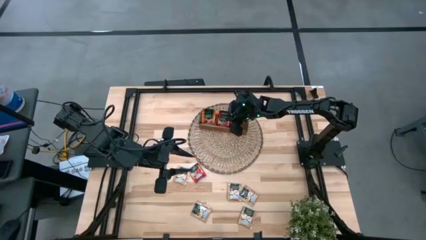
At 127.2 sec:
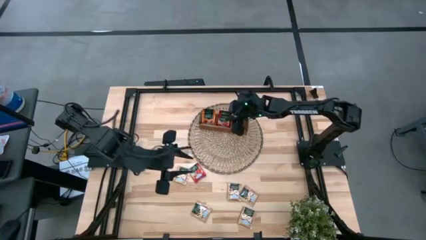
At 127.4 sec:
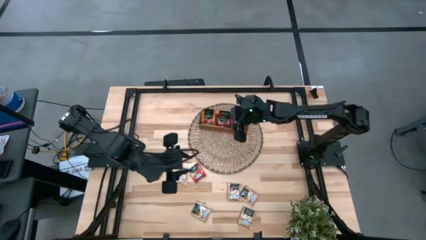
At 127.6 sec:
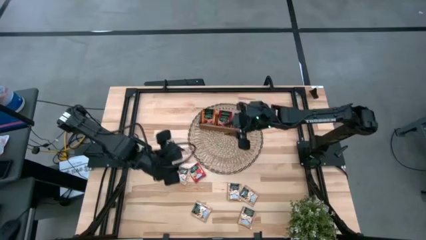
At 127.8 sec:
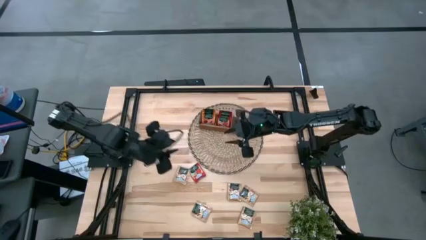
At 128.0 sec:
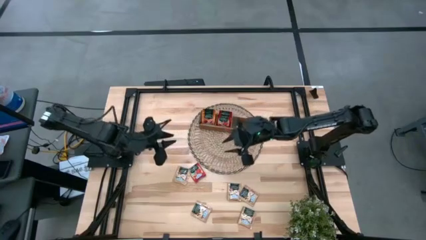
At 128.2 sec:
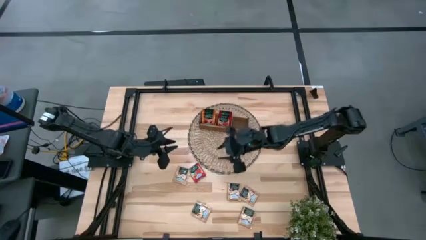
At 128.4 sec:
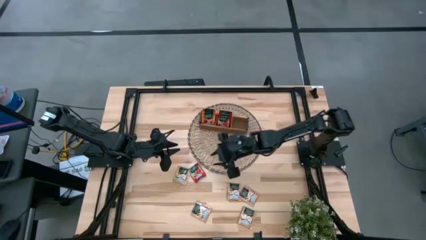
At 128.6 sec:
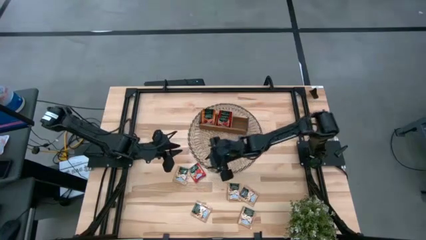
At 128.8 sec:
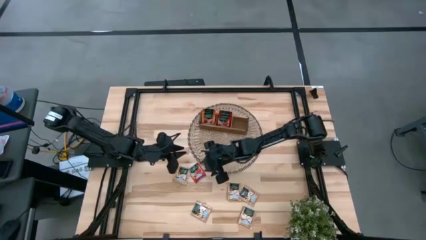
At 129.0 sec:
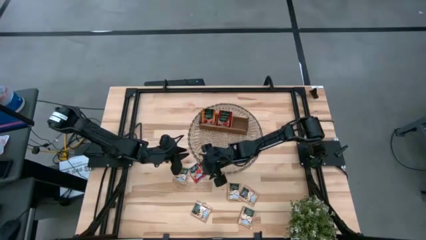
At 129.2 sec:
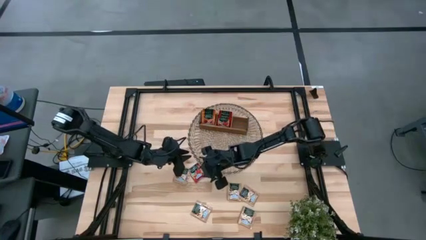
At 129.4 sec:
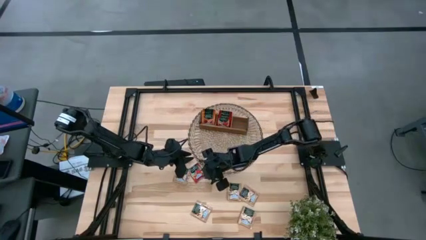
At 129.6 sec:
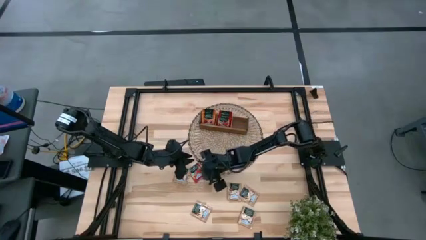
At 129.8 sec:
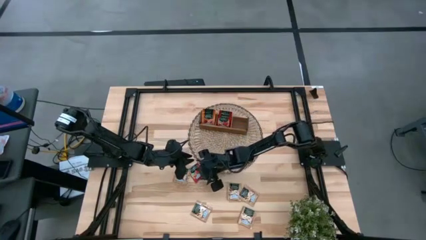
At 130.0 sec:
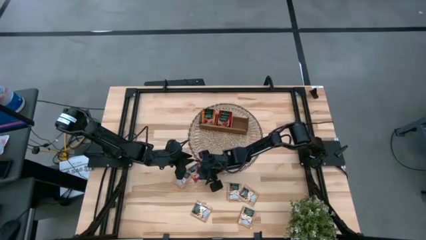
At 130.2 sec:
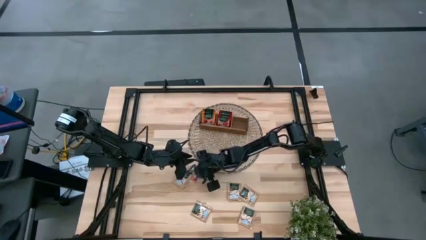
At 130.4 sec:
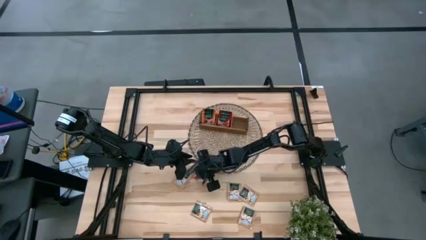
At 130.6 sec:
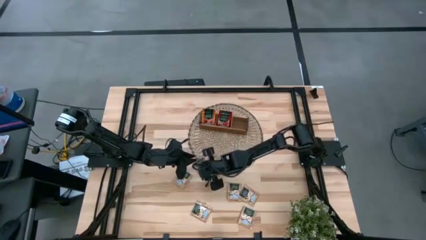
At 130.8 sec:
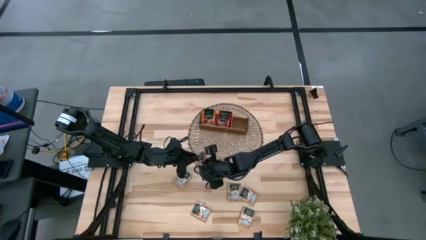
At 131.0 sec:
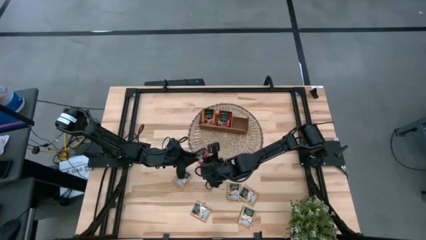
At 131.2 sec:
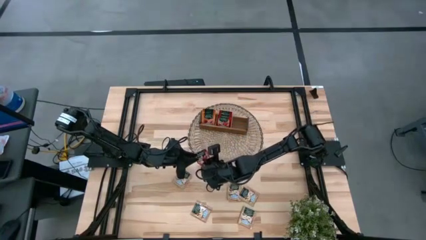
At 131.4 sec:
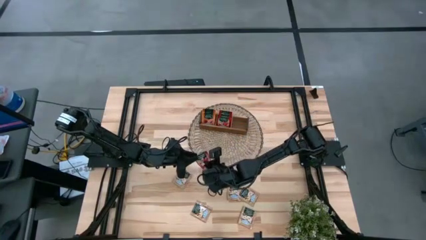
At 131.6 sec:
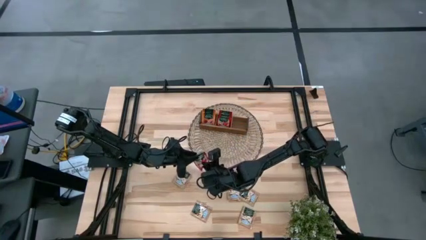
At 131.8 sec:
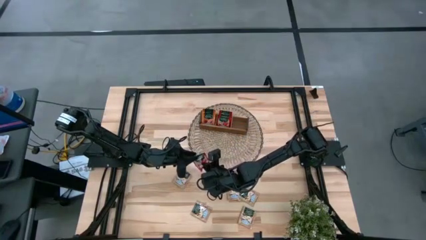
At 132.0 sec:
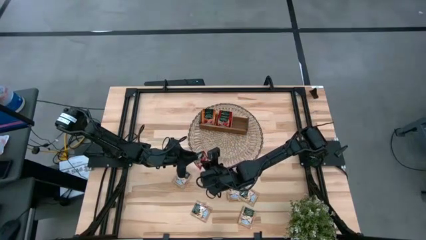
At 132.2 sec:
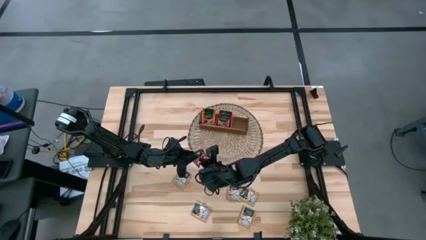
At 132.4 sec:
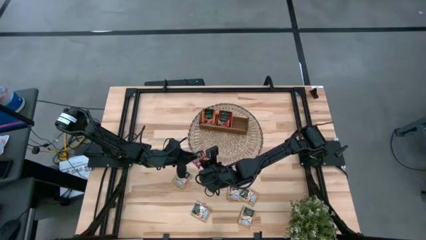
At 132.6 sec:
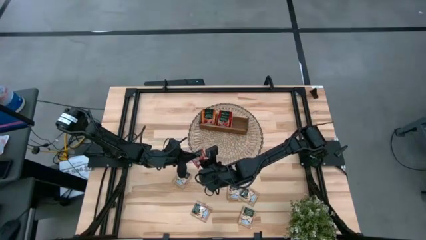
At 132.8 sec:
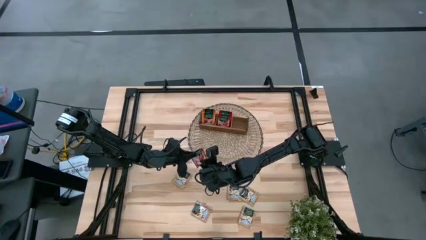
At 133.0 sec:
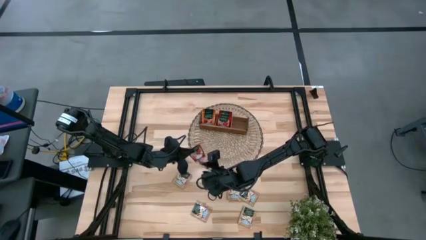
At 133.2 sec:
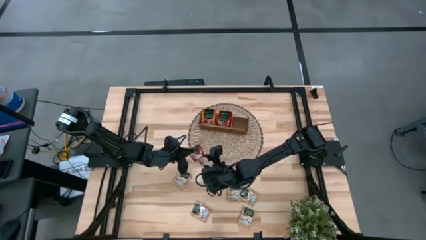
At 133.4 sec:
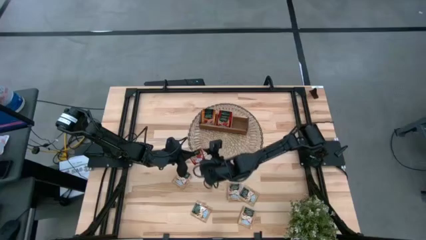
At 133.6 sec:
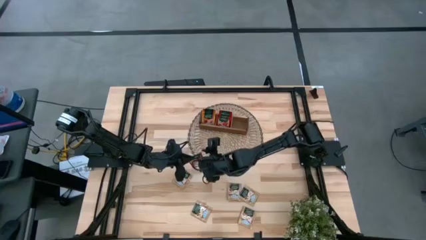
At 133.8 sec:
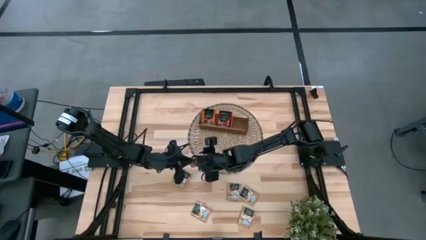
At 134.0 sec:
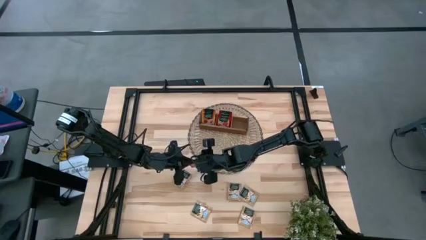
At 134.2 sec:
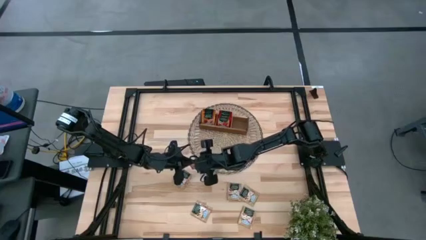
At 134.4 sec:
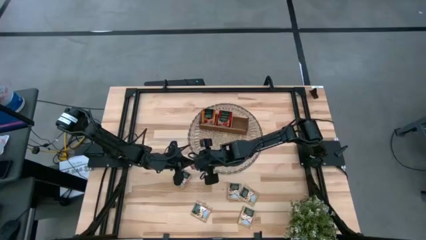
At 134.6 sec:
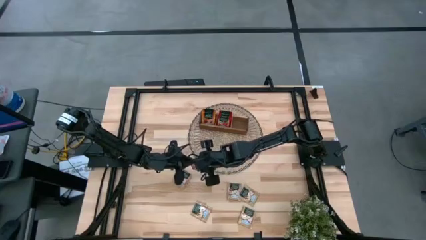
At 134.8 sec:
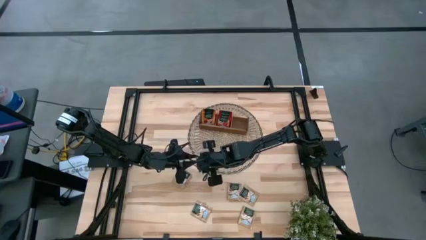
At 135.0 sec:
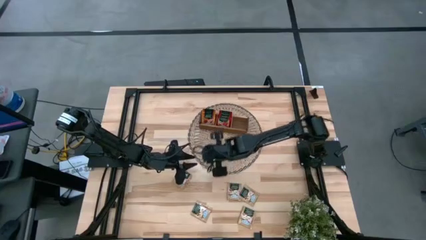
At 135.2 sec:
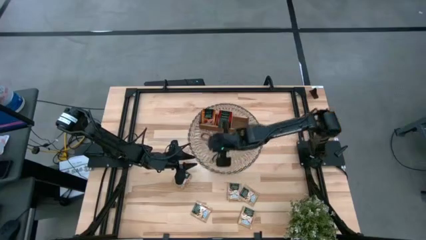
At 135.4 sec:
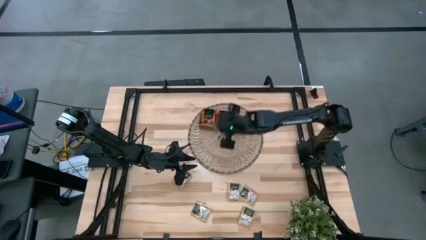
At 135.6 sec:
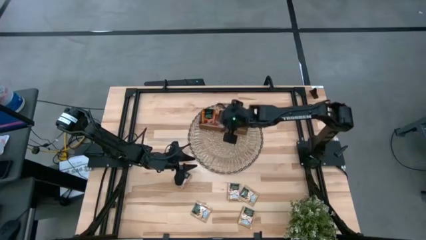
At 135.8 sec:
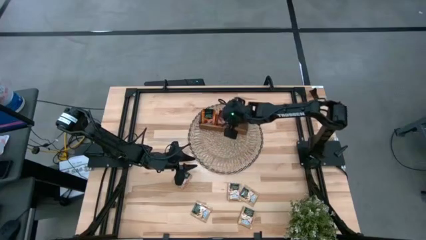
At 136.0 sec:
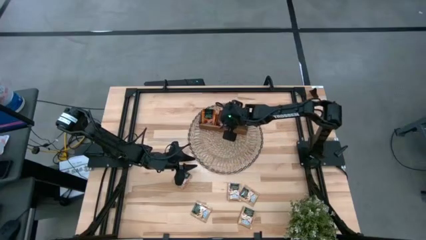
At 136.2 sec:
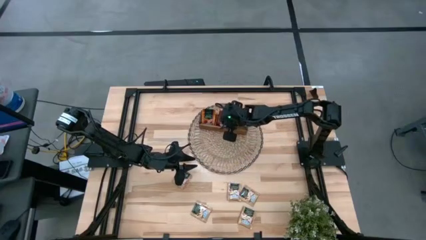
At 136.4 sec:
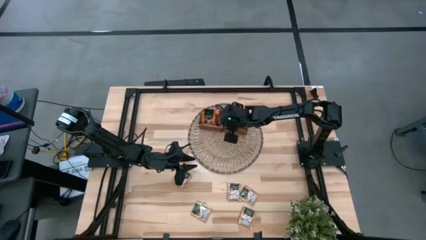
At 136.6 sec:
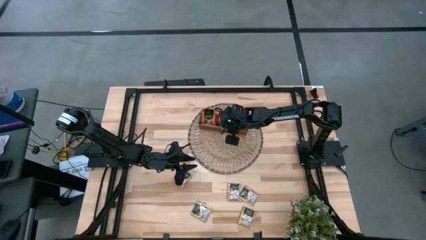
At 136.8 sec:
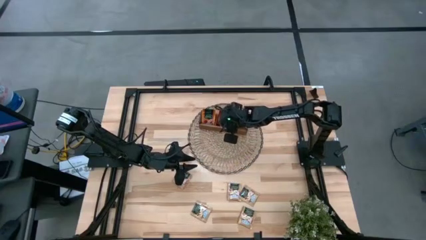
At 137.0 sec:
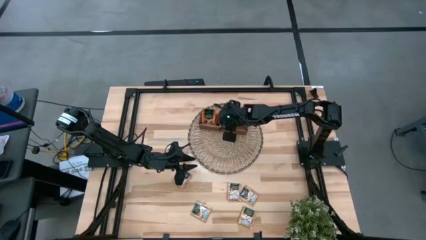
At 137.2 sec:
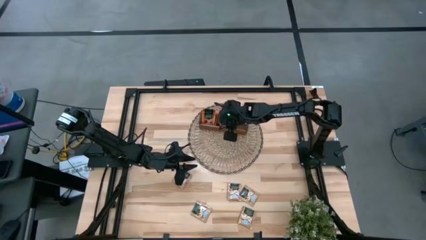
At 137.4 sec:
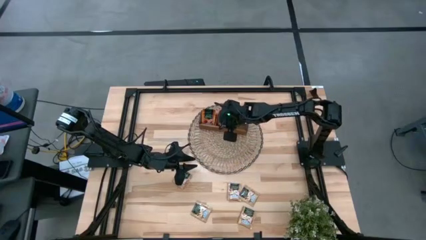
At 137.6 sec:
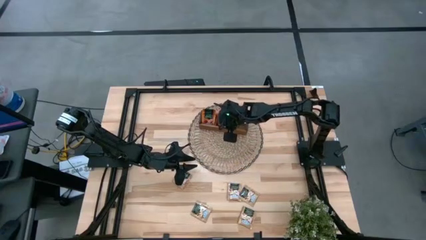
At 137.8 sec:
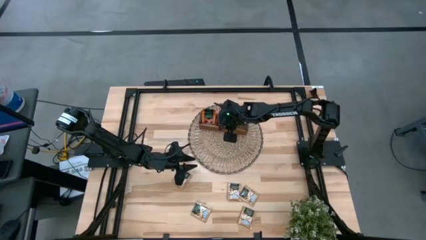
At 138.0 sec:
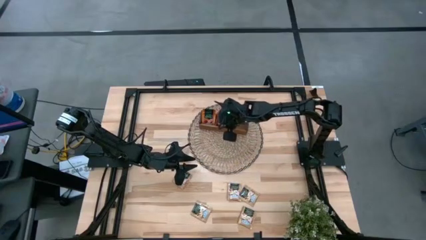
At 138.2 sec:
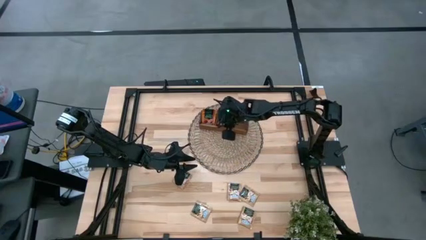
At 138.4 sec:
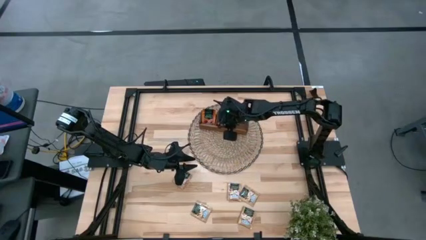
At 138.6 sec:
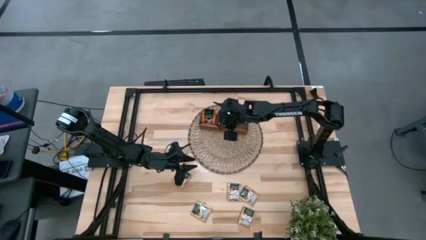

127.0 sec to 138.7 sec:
Task: Pick & Place Tea
Put the red tea bag into the middle section of the wooden organizer

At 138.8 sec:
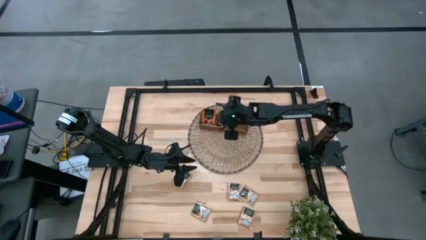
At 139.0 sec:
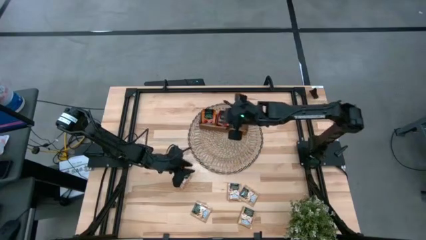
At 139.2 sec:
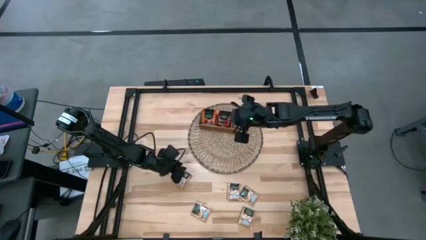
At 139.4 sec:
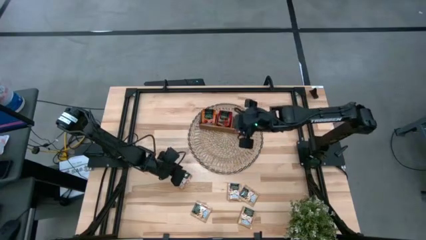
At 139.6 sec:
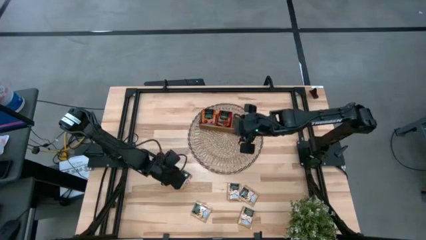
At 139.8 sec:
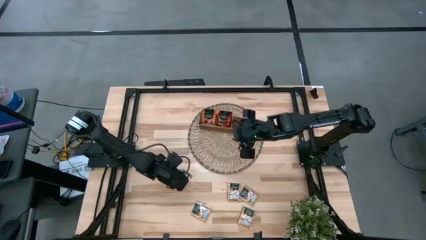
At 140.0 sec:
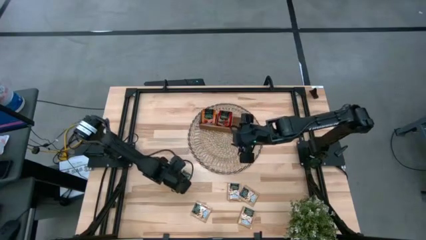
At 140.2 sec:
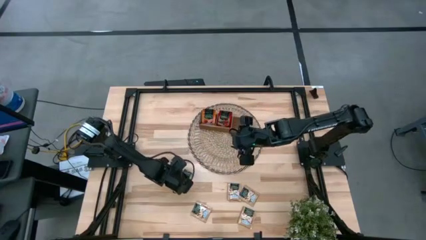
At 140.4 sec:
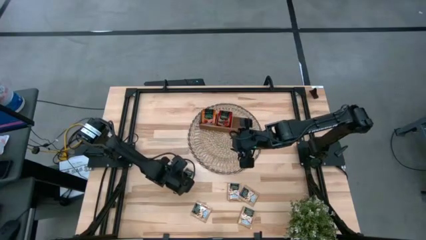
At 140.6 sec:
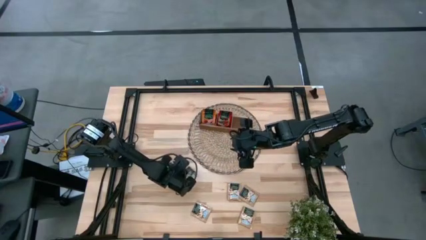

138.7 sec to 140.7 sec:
Put the brown tea bag into the right section of the wooden organizer

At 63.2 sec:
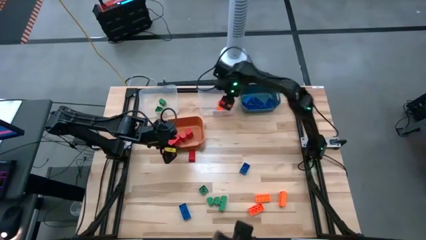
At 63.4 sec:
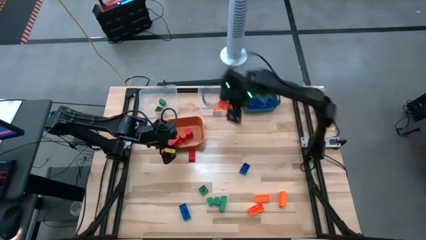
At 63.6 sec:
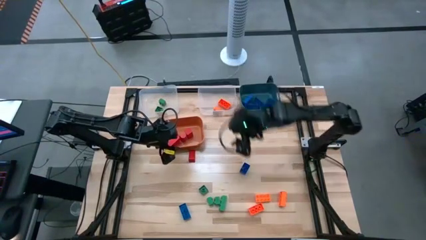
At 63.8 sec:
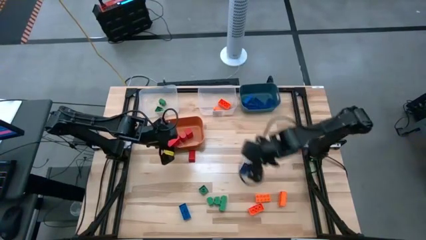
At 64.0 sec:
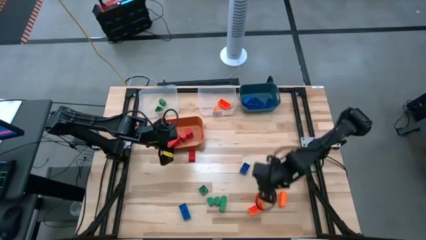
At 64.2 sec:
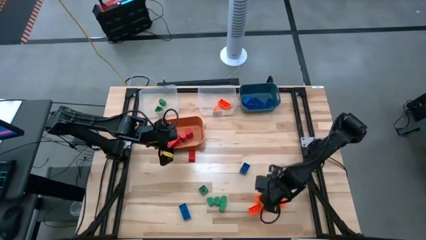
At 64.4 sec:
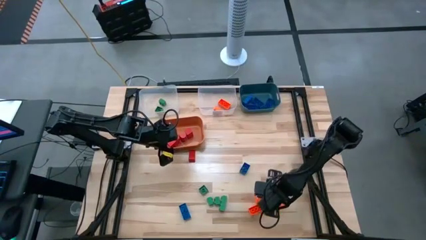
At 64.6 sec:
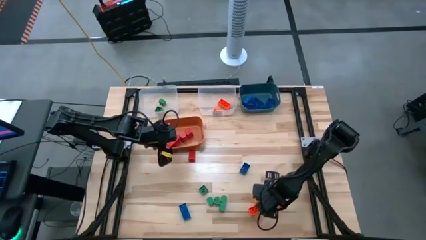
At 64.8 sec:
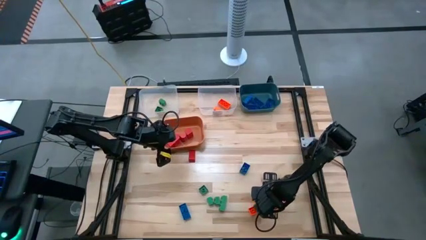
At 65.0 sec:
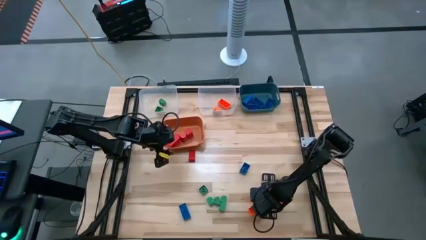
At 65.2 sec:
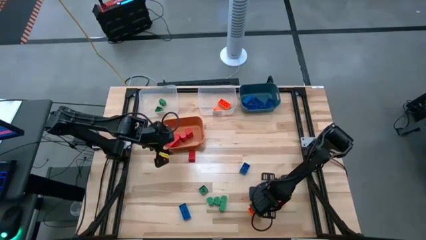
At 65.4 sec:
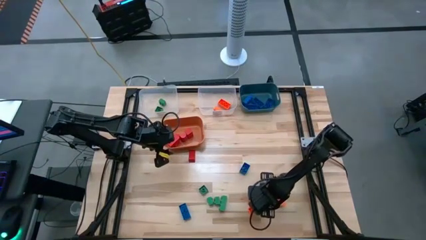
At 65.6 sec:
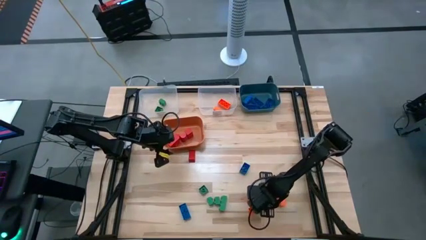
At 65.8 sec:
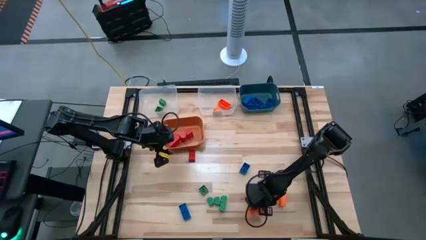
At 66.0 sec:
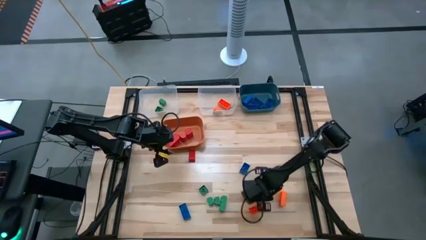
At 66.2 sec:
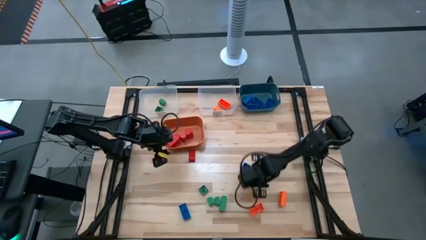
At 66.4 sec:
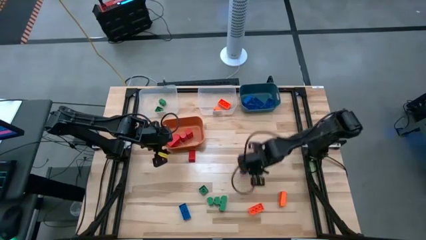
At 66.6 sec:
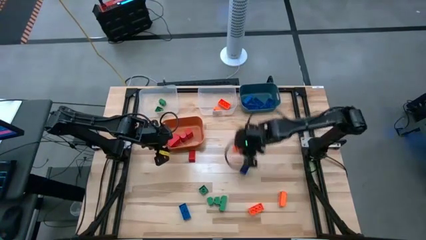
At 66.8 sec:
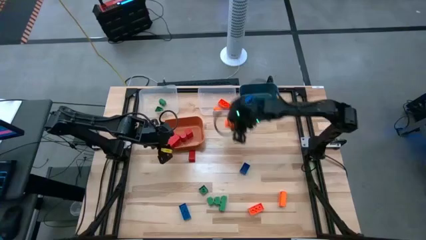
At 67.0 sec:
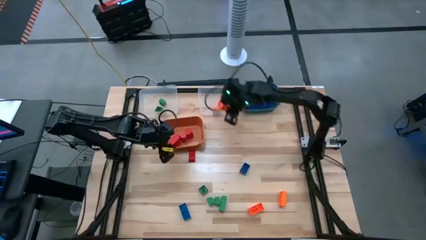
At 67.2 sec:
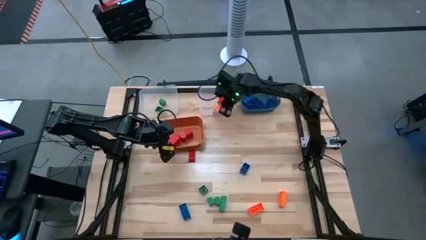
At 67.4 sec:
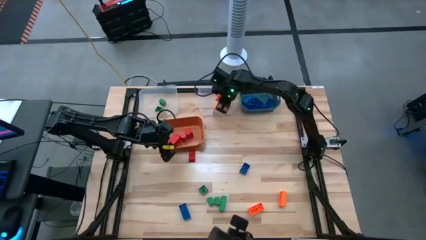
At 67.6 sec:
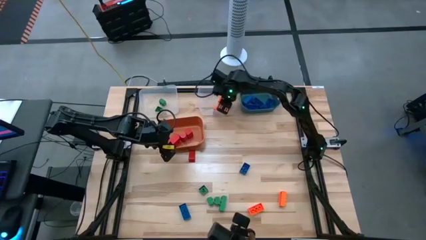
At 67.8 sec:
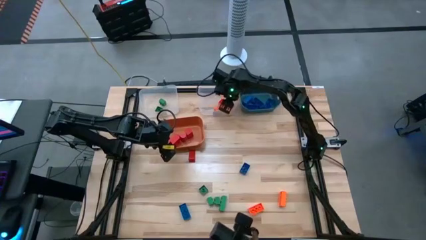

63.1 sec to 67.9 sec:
Task: Sort blocks
Put the orange game piece into the right transparent bin
